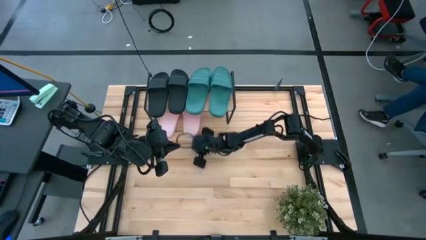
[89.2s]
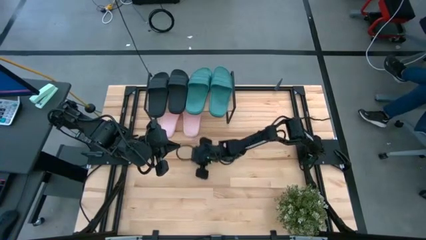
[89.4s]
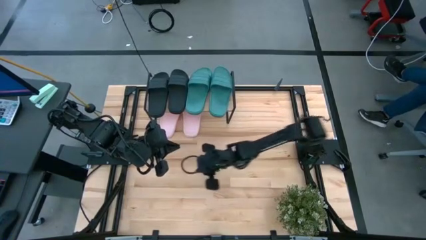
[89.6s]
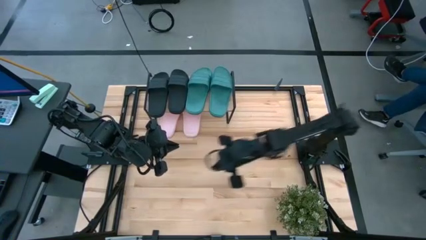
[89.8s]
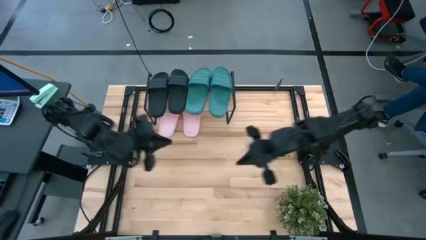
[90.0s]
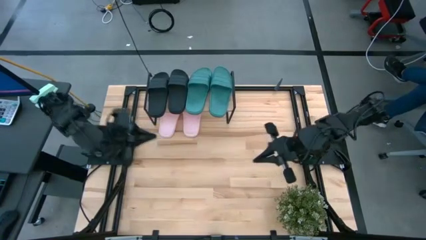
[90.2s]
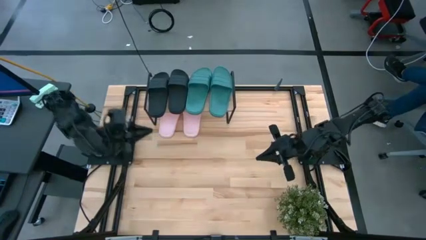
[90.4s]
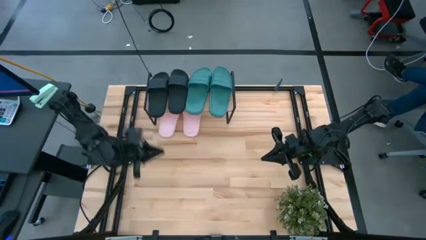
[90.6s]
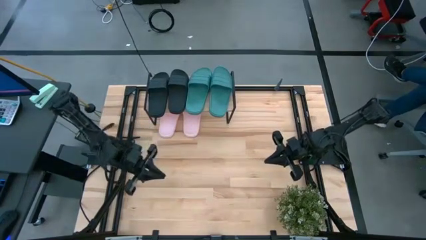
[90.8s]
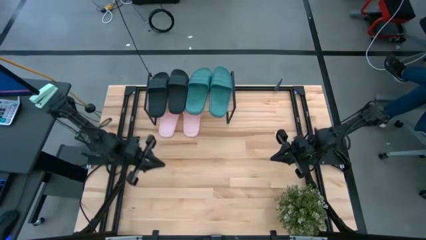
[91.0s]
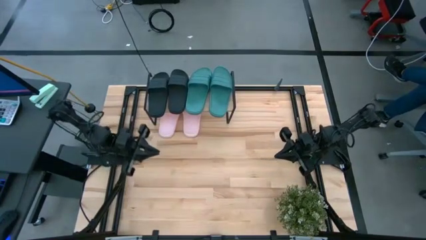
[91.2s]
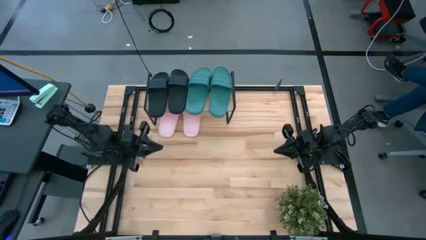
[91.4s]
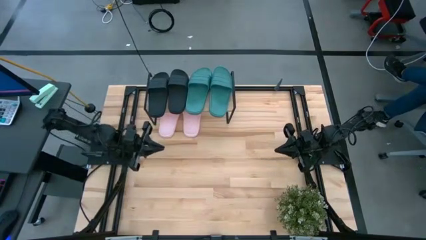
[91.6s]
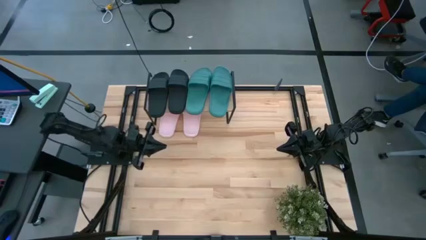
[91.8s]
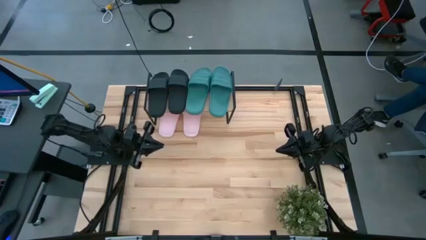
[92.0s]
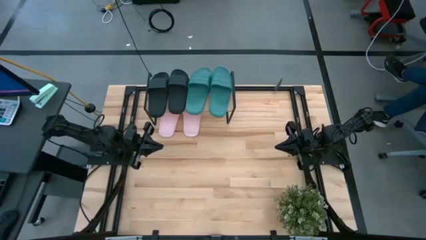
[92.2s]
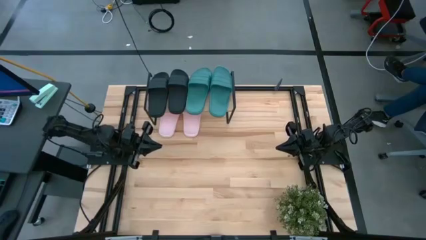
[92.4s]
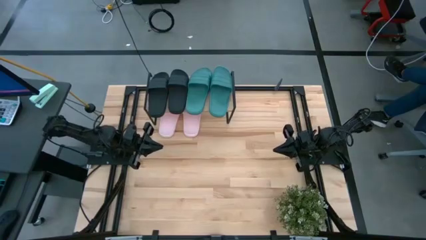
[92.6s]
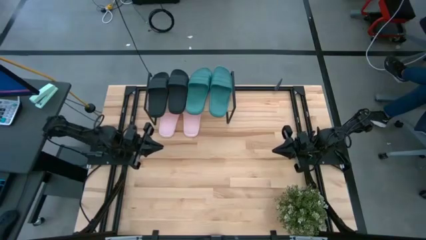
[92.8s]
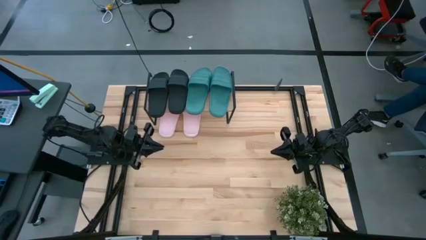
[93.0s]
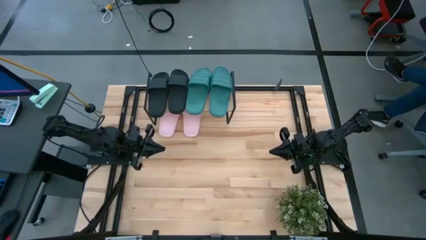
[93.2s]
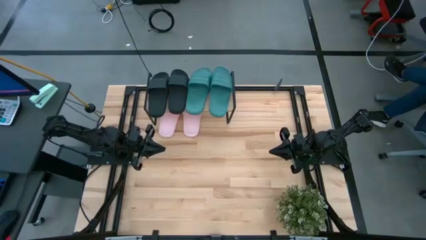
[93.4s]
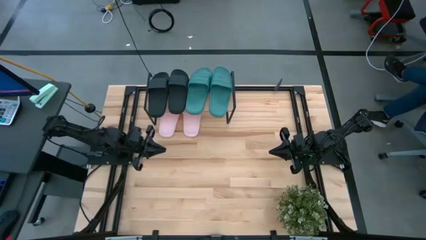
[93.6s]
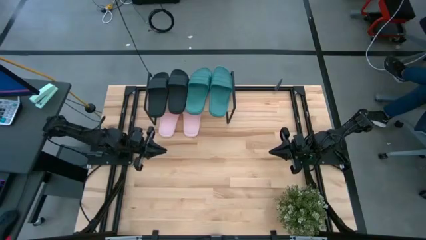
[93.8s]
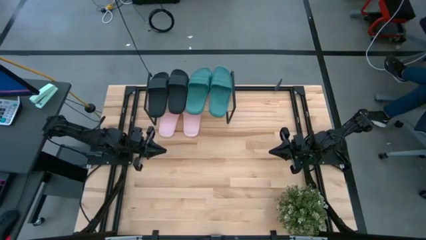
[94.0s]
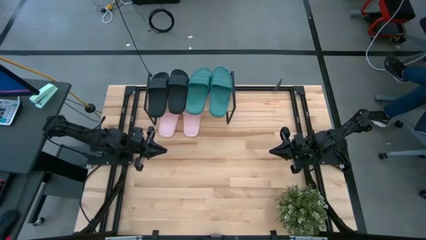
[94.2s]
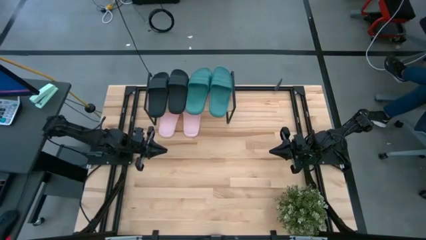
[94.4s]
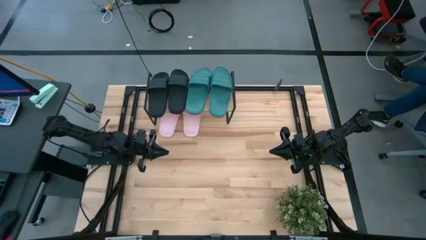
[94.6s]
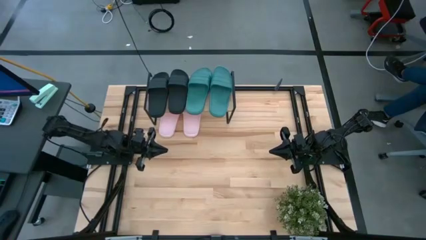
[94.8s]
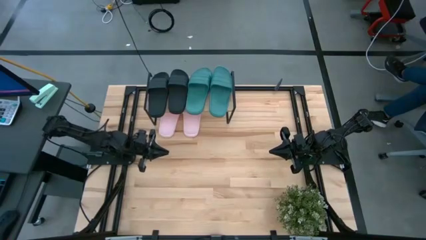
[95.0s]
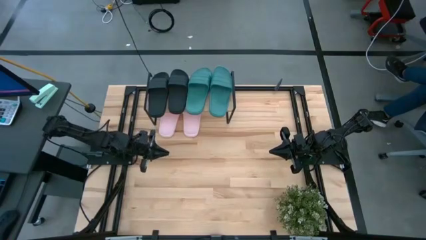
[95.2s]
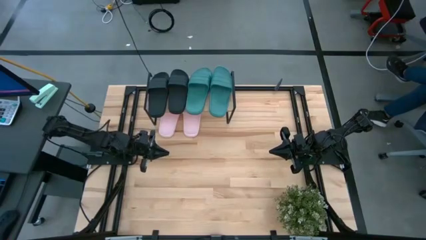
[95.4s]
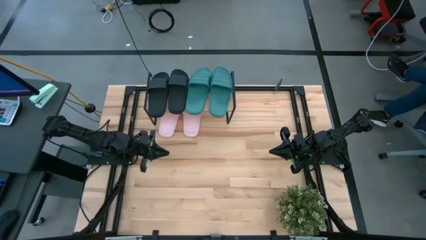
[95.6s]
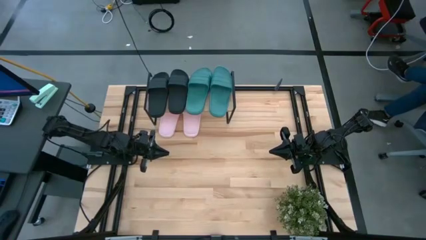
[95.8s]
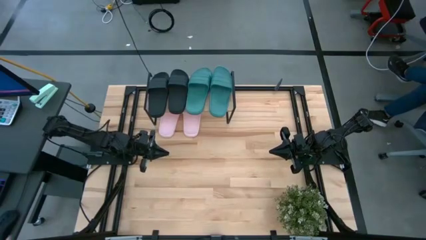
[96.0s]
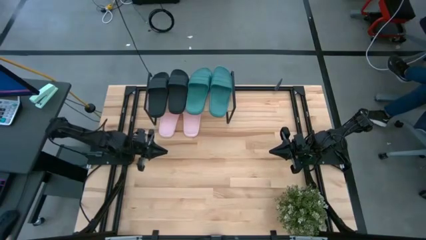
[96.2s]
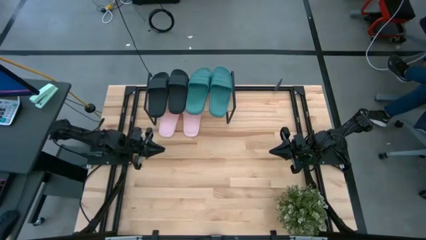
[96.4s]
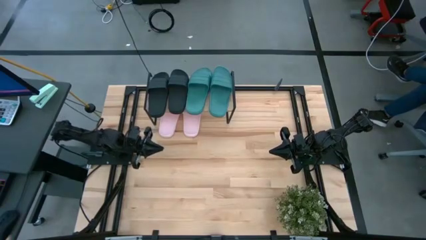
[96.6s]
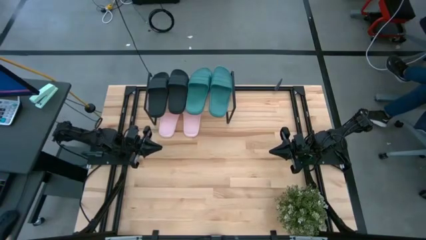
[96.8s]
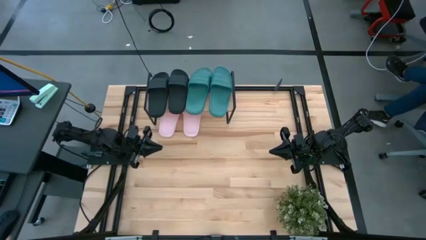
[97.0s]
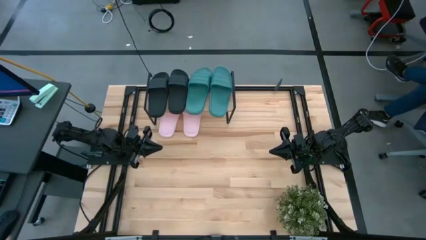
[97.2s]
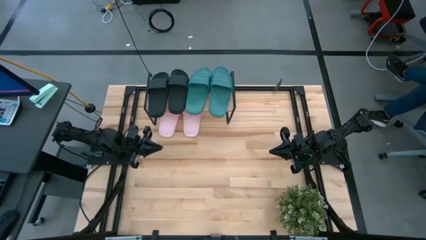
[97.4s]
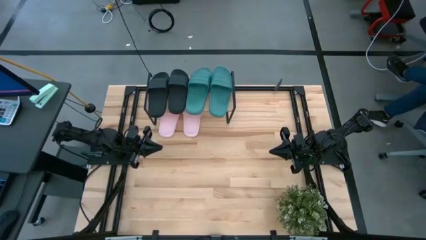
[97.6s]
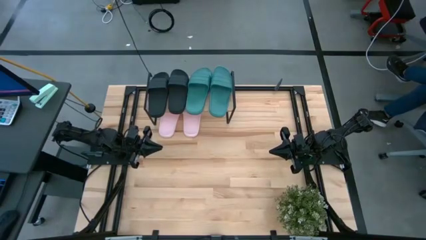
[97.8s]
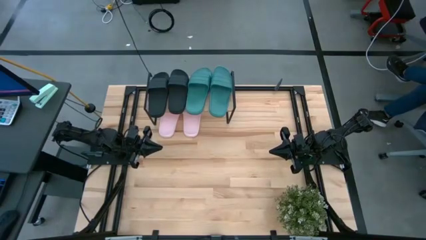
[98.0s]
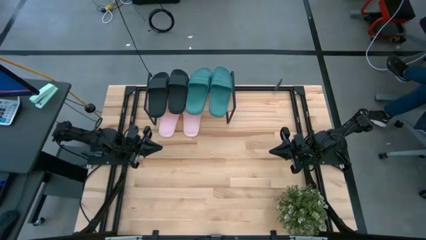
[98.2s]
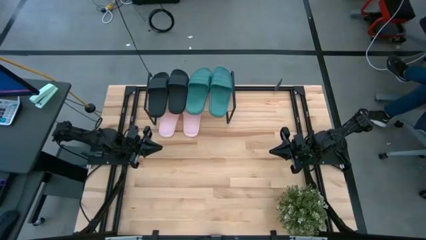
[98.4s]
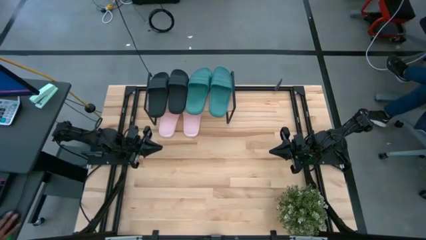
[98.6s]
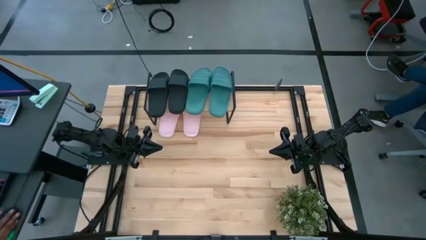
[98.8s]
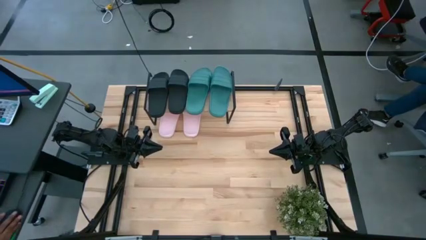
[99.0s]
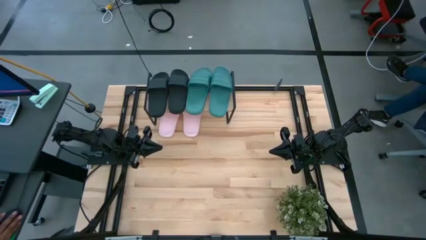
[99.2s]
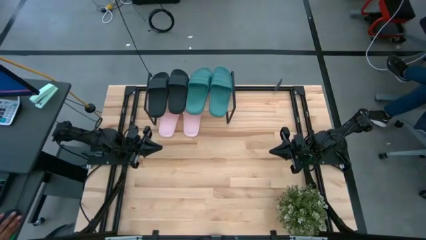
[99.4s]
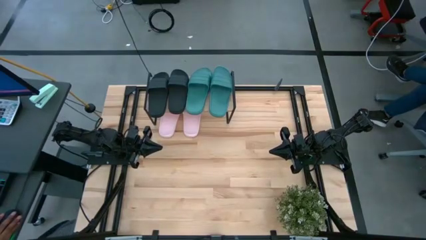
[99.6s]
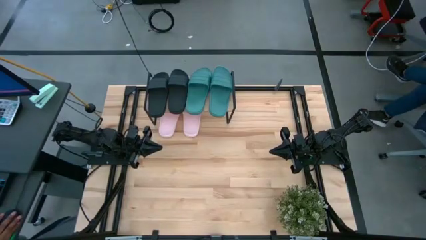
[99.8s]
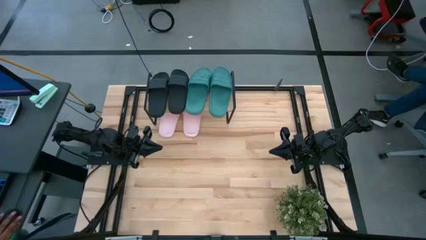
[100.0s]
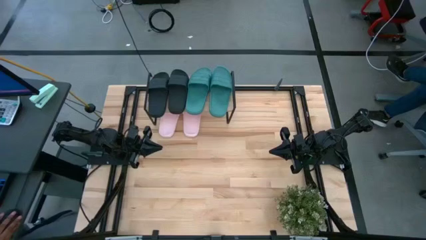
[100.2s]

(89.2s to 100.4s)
Task: Pick and place slides into the shelf
Return to Home Position

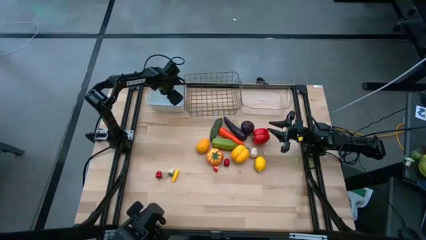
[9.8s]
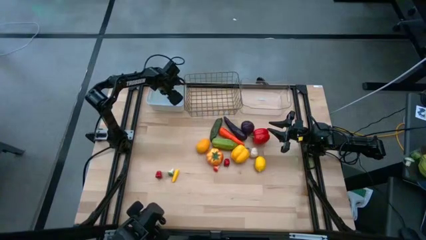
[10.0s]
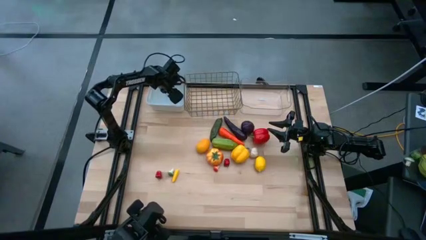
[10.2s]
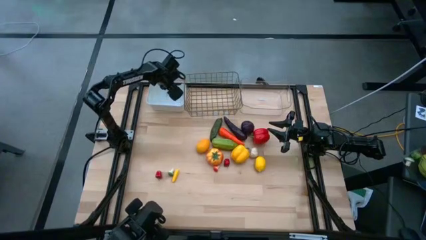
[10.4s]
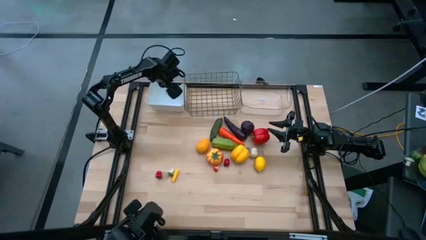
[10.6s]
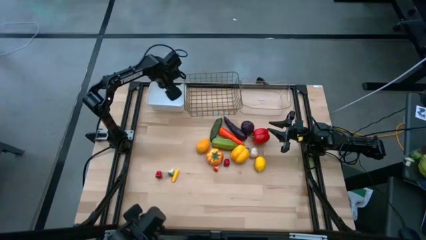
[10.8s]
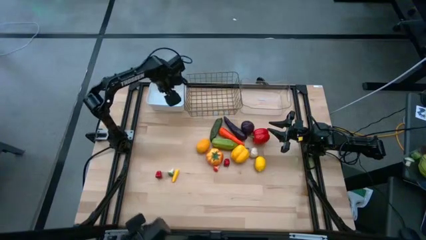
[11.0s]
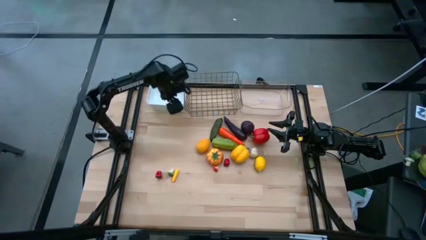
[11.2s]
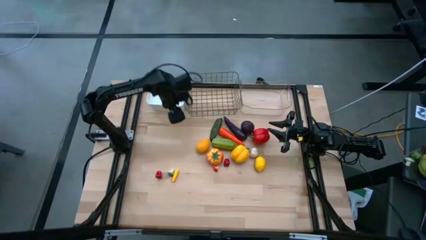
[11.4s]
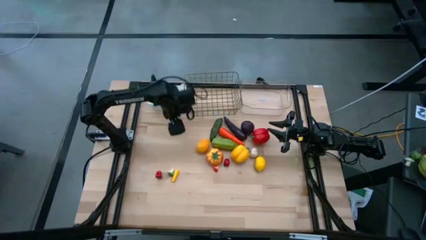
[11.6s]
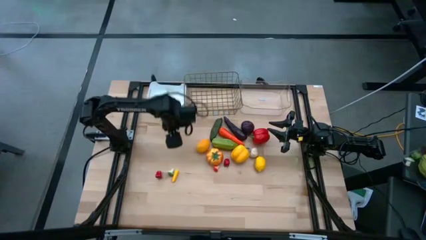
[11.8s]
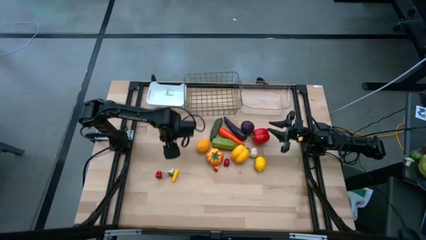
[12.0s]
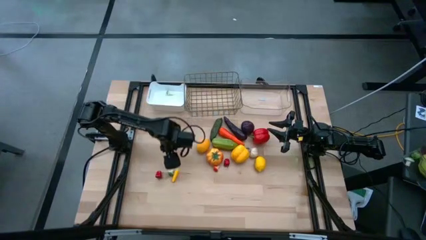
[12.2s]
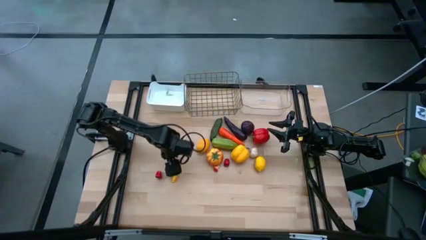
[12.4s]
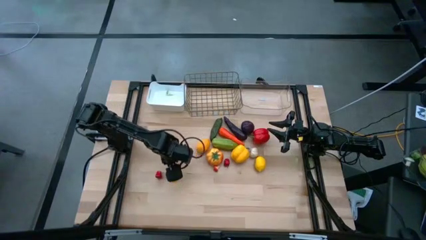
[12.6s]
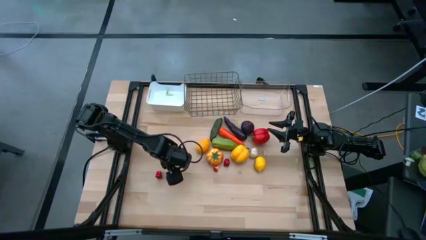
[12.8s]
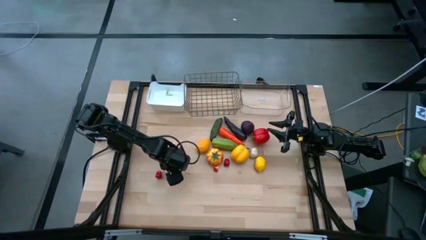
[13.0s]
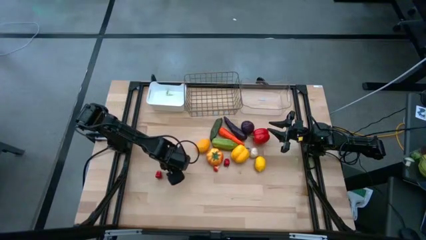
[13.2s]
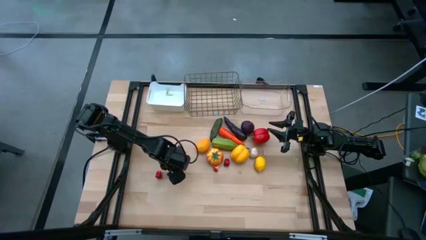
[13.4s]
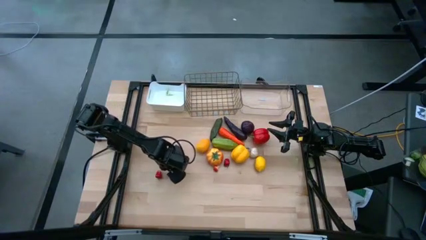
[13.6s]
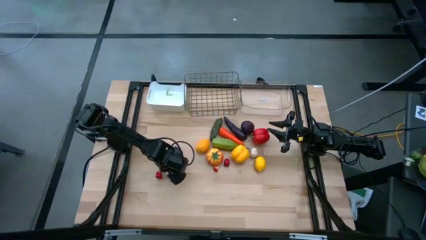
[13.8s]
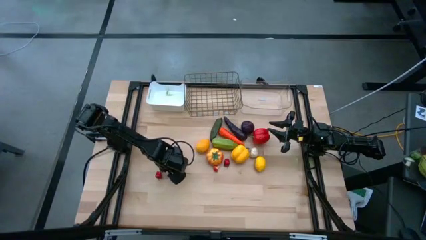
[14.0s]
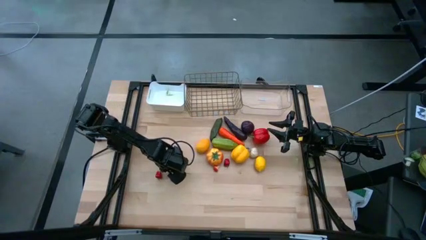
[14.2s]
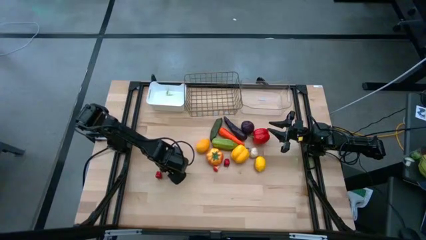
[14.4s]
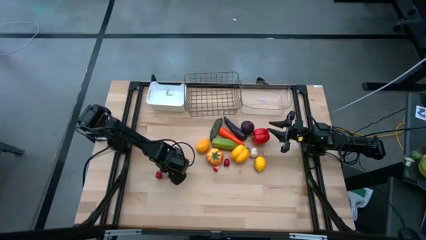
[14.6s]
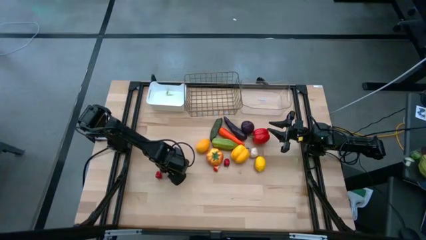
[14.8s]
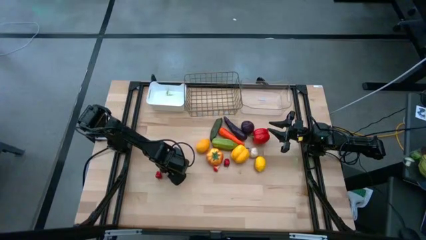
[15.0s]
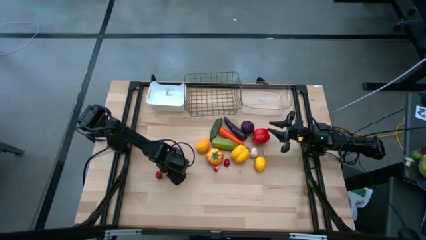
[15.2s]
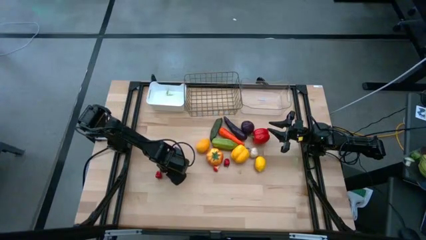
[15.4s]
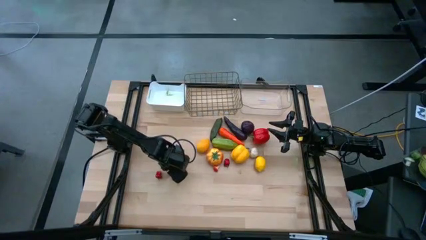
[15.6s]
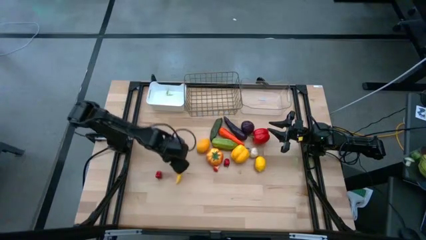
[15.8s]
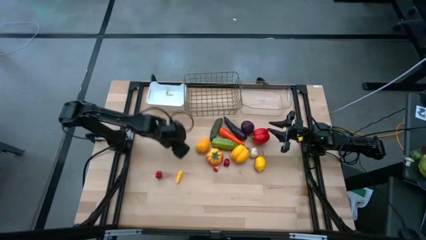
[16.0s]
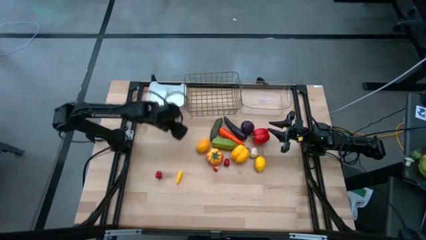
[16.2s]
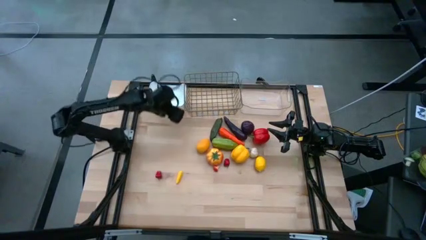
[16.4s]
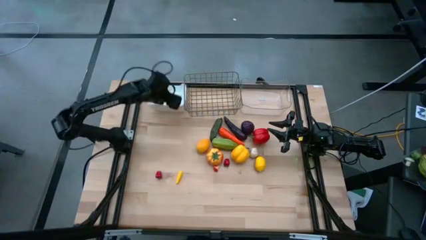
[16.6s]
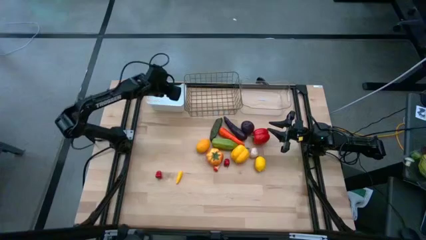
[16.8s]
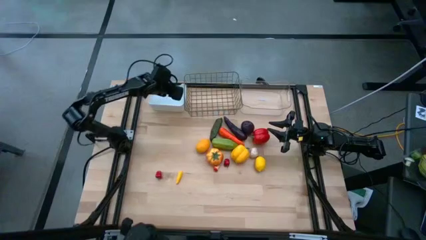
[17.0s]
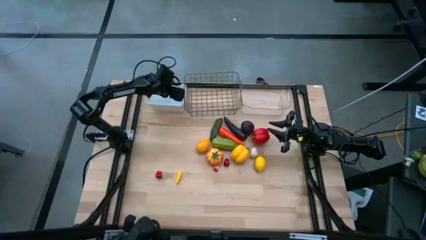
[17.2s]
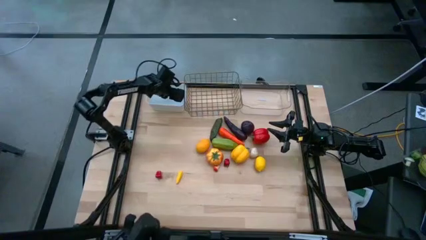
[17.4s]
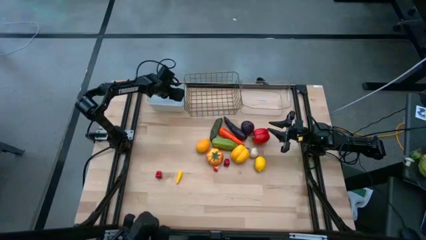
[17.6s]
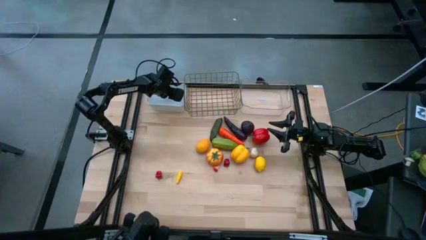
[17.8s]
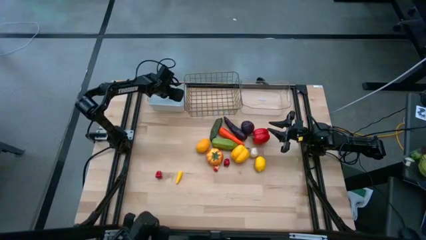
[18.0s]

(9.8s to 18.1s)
Task: Sort produce into baskets
Put the green mushroom into the white bin
